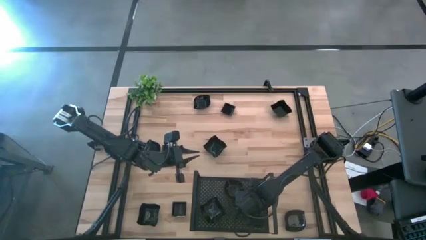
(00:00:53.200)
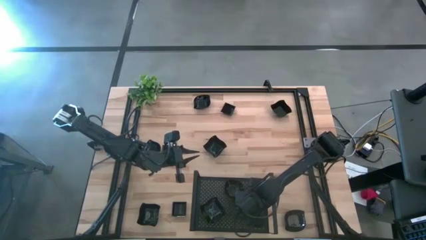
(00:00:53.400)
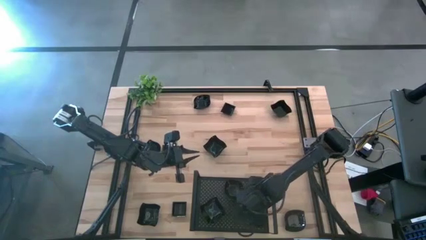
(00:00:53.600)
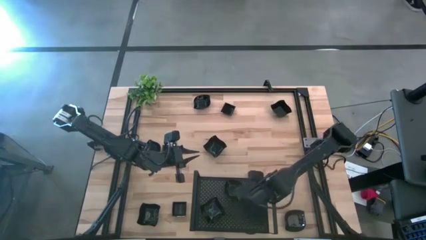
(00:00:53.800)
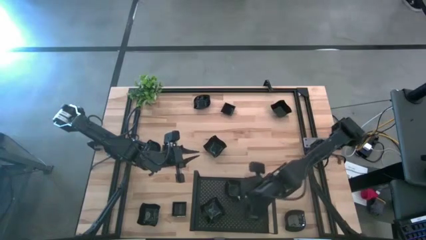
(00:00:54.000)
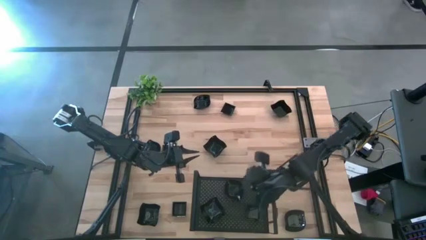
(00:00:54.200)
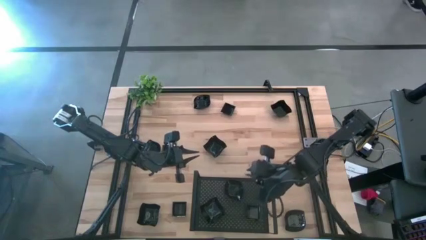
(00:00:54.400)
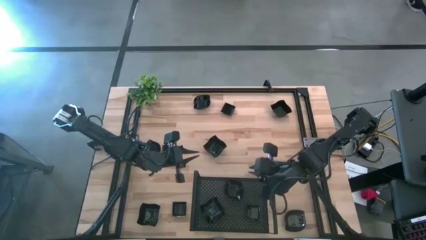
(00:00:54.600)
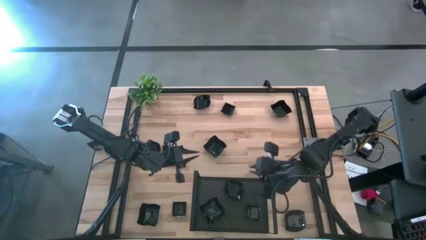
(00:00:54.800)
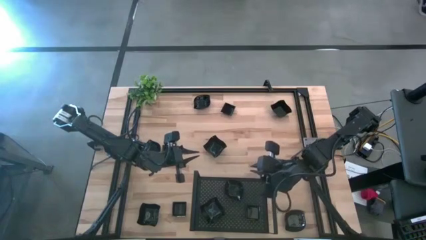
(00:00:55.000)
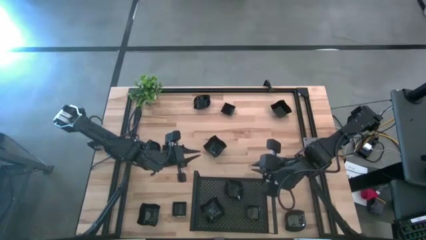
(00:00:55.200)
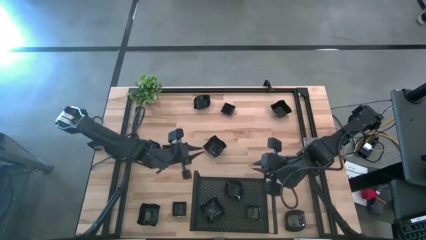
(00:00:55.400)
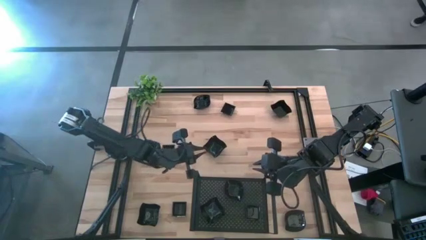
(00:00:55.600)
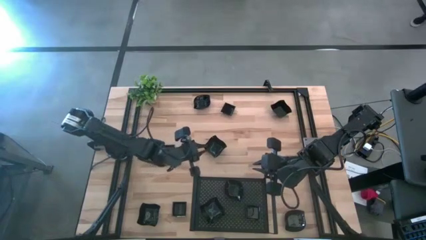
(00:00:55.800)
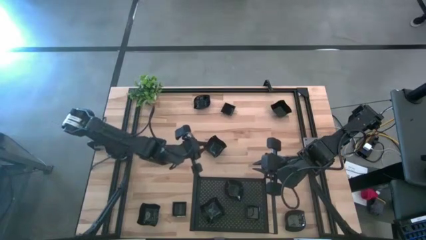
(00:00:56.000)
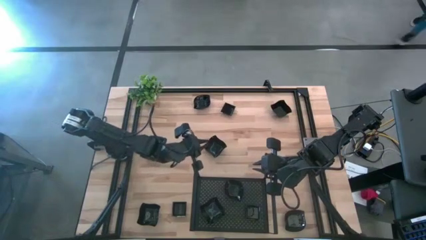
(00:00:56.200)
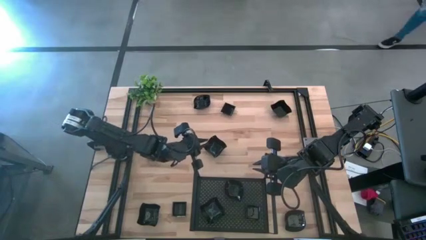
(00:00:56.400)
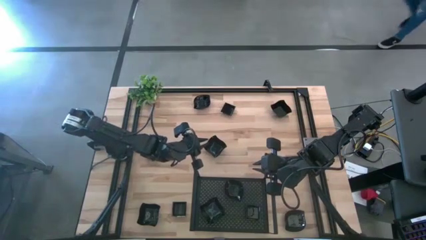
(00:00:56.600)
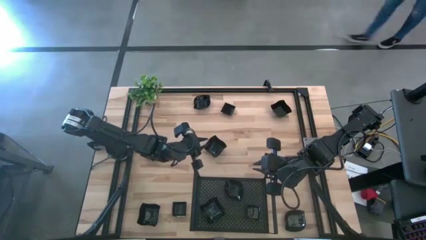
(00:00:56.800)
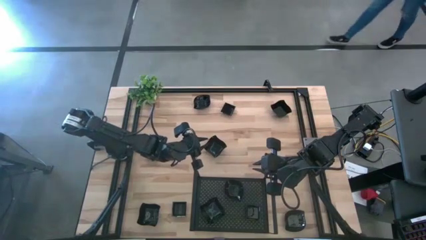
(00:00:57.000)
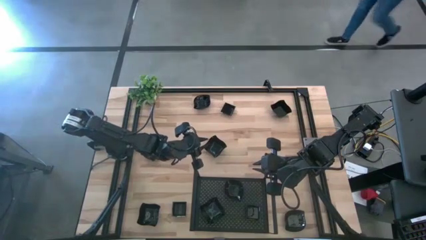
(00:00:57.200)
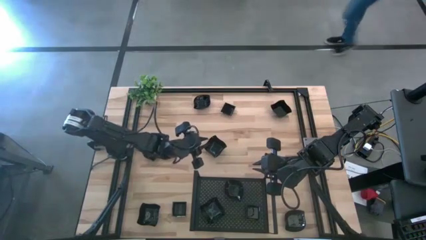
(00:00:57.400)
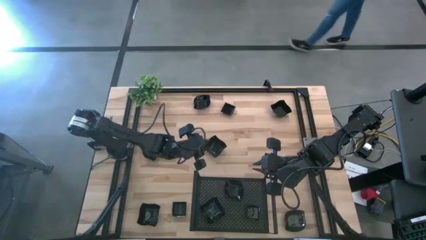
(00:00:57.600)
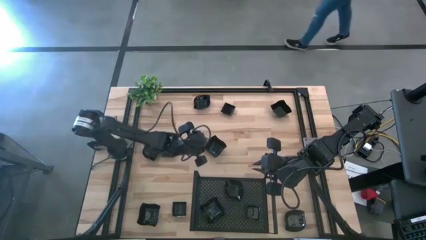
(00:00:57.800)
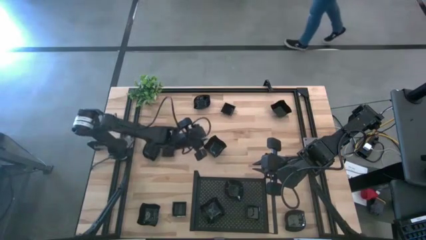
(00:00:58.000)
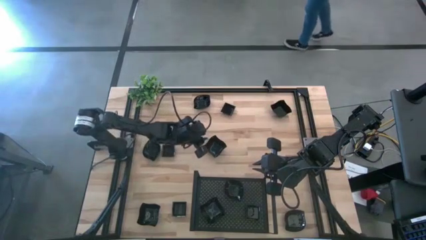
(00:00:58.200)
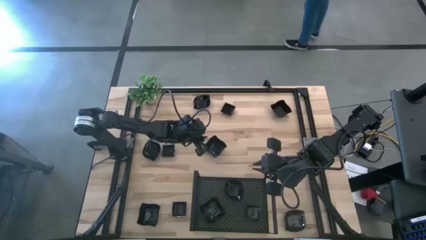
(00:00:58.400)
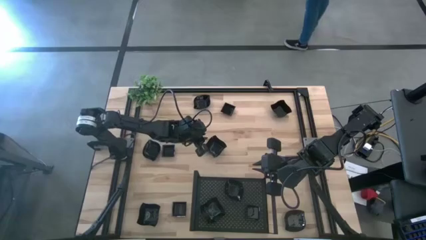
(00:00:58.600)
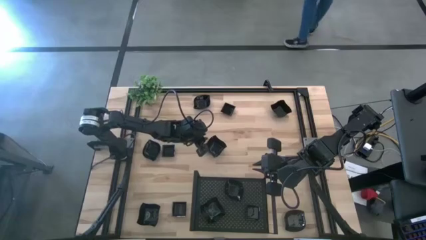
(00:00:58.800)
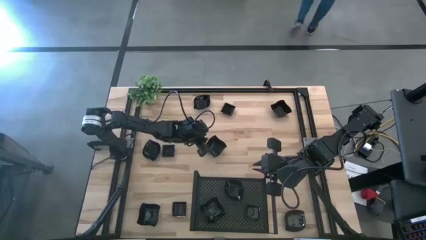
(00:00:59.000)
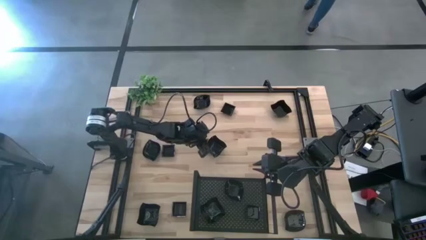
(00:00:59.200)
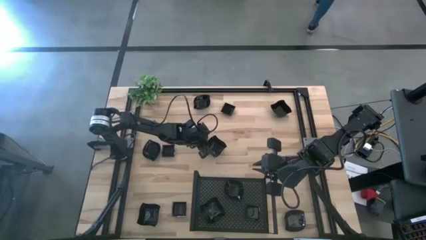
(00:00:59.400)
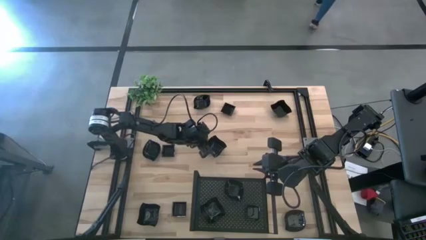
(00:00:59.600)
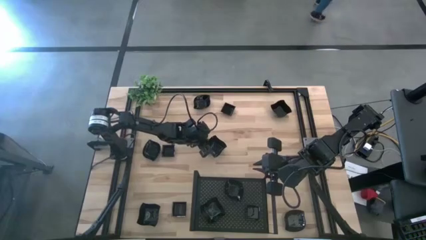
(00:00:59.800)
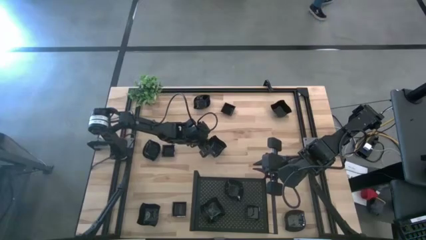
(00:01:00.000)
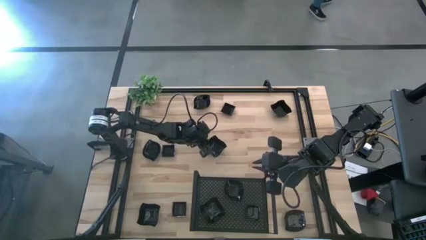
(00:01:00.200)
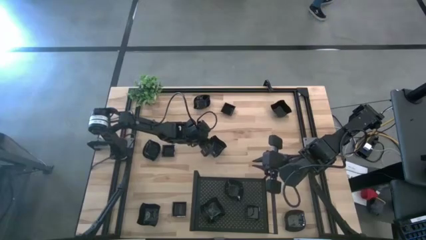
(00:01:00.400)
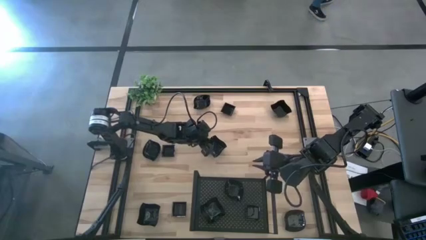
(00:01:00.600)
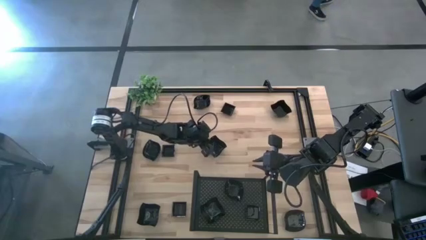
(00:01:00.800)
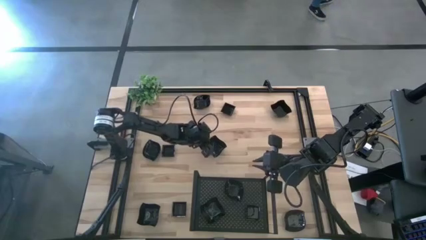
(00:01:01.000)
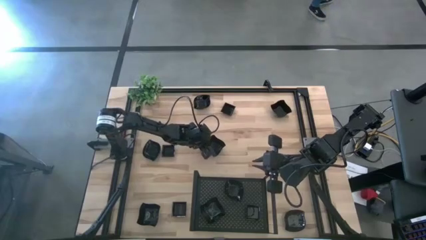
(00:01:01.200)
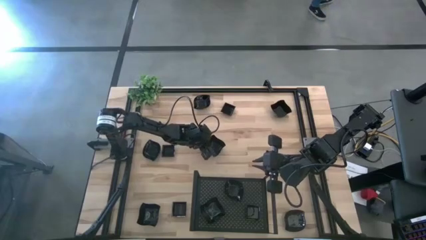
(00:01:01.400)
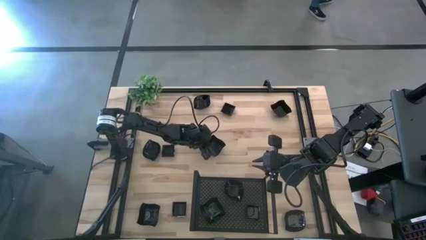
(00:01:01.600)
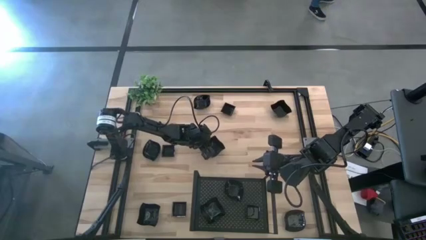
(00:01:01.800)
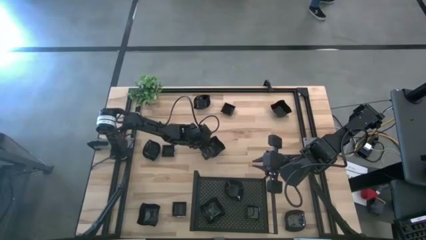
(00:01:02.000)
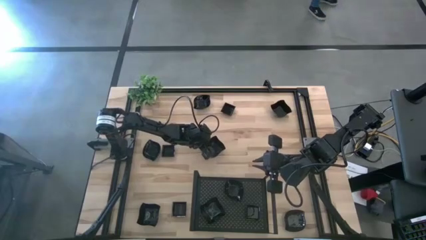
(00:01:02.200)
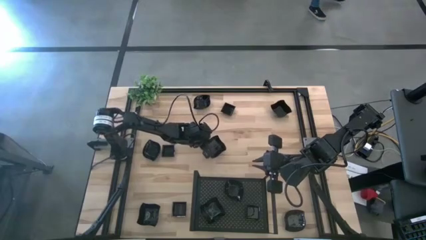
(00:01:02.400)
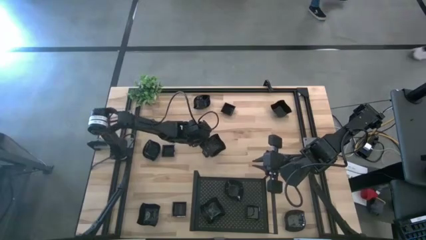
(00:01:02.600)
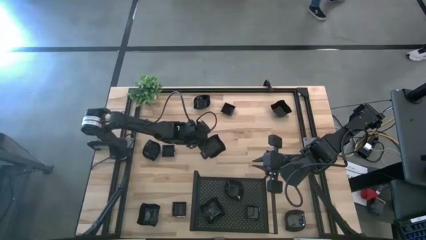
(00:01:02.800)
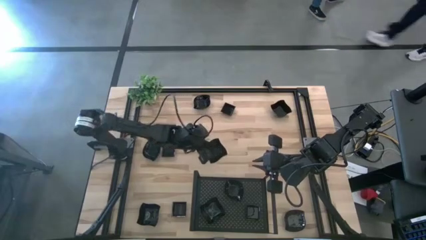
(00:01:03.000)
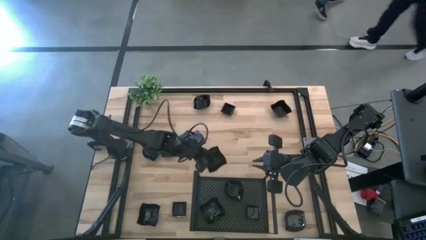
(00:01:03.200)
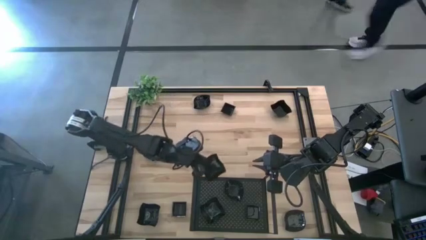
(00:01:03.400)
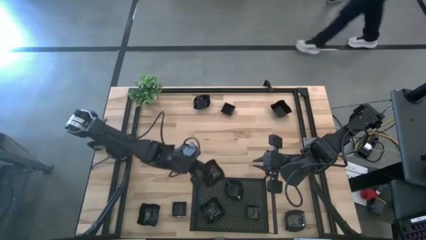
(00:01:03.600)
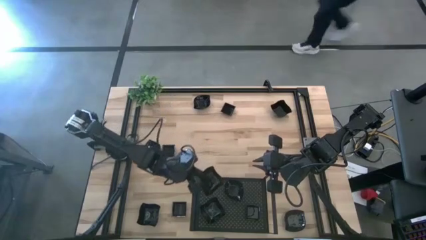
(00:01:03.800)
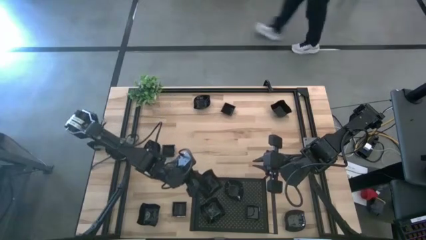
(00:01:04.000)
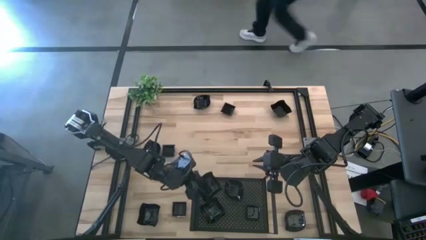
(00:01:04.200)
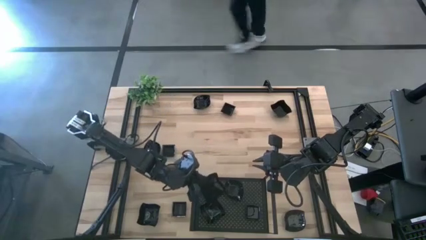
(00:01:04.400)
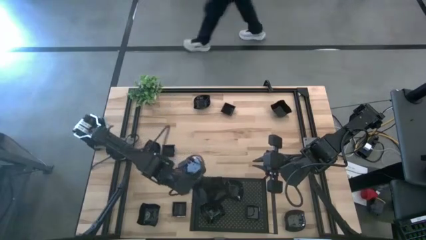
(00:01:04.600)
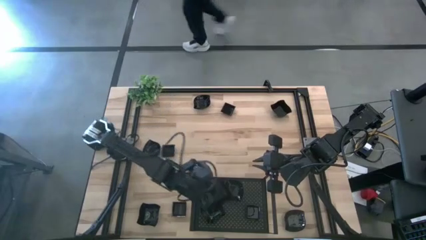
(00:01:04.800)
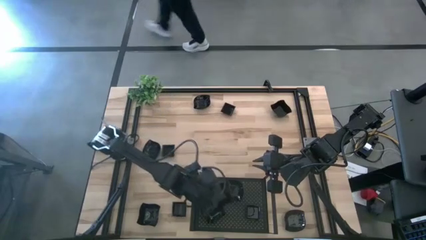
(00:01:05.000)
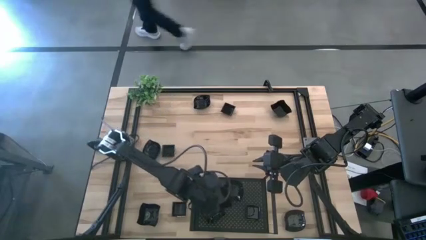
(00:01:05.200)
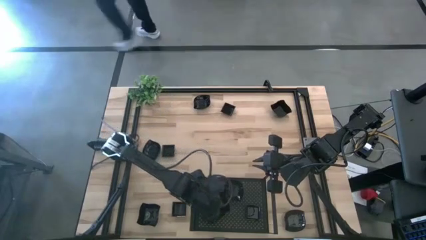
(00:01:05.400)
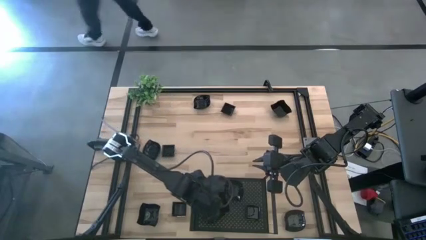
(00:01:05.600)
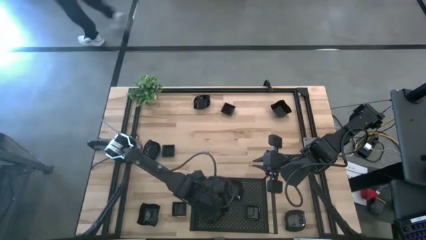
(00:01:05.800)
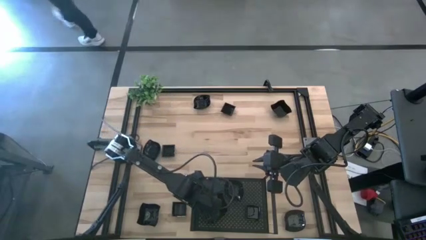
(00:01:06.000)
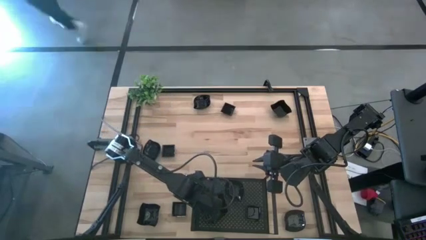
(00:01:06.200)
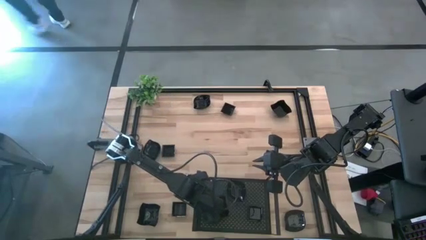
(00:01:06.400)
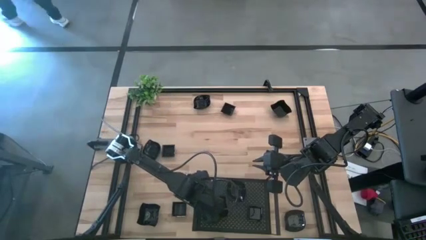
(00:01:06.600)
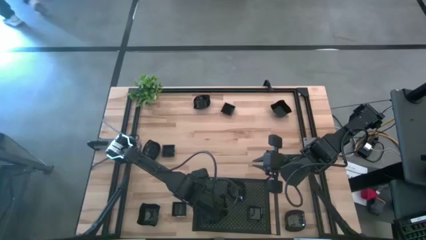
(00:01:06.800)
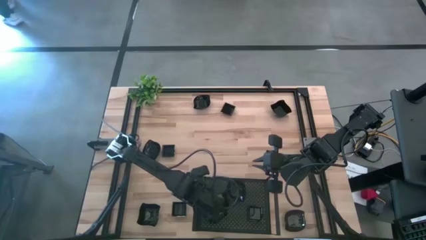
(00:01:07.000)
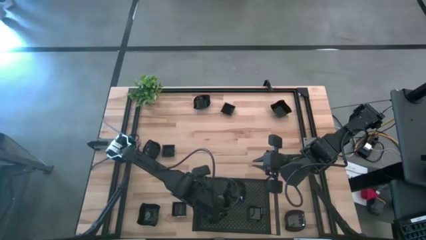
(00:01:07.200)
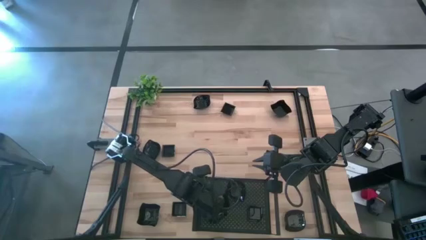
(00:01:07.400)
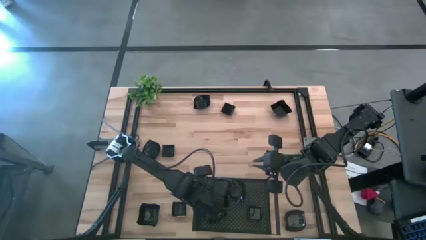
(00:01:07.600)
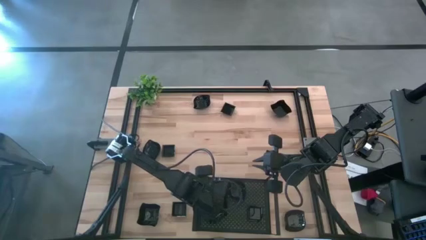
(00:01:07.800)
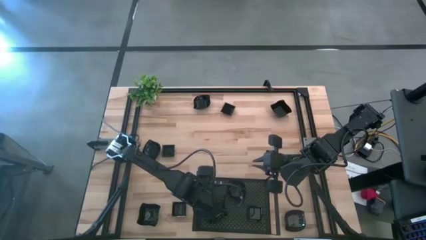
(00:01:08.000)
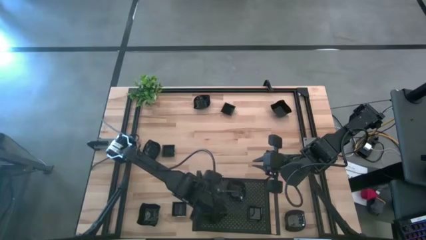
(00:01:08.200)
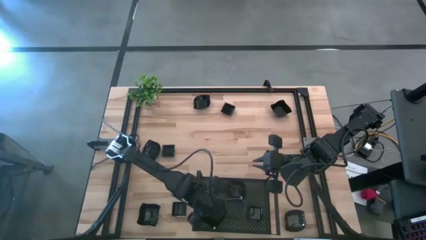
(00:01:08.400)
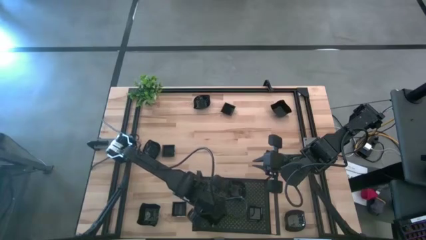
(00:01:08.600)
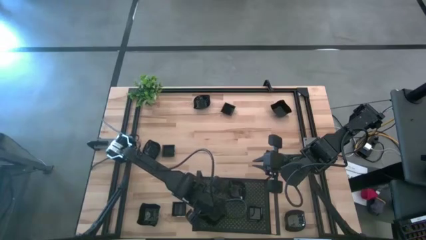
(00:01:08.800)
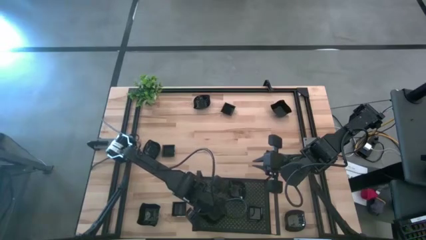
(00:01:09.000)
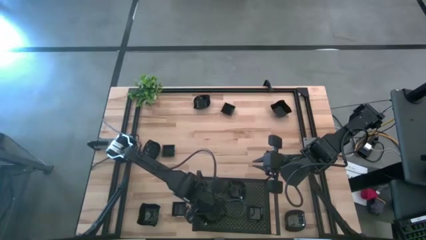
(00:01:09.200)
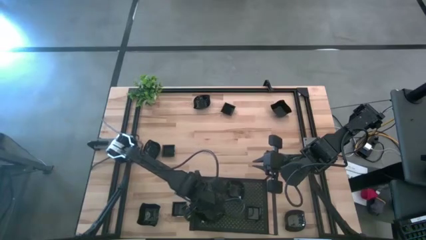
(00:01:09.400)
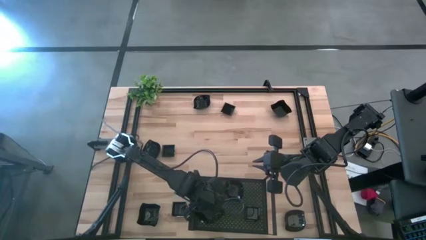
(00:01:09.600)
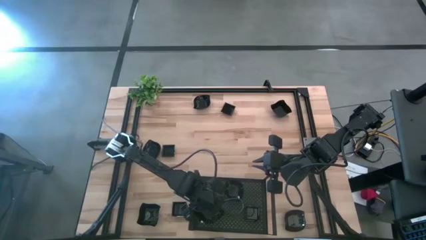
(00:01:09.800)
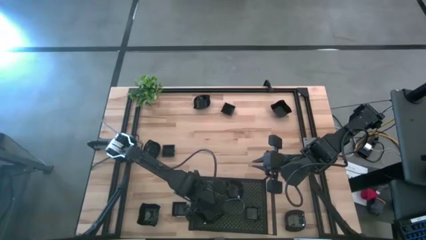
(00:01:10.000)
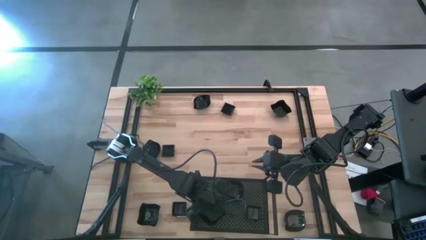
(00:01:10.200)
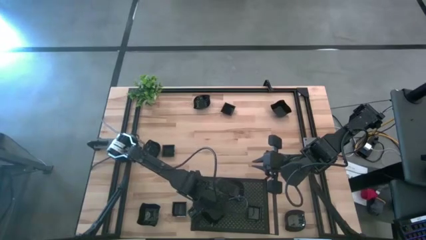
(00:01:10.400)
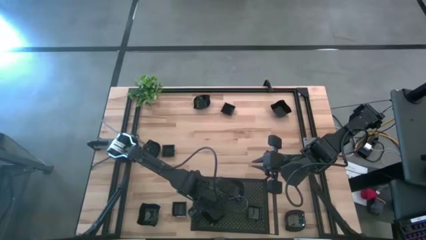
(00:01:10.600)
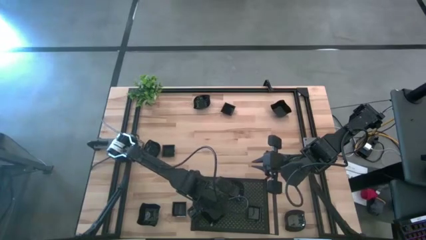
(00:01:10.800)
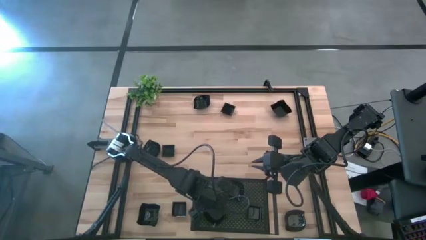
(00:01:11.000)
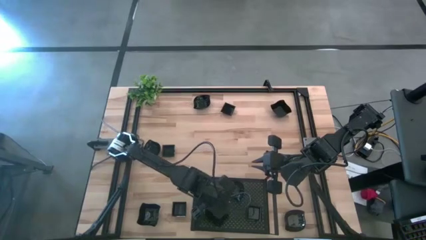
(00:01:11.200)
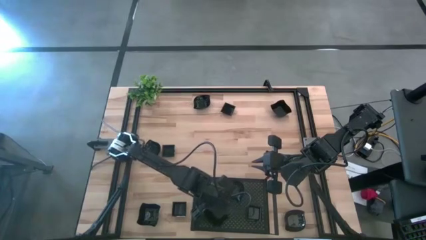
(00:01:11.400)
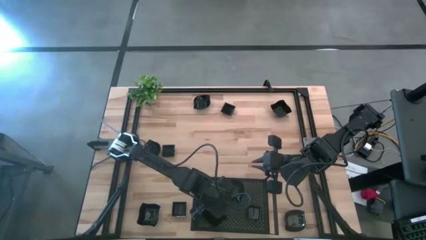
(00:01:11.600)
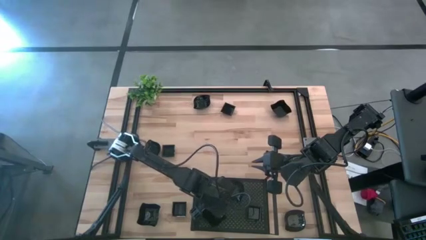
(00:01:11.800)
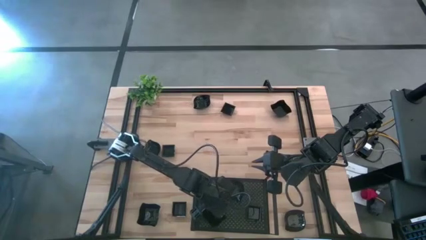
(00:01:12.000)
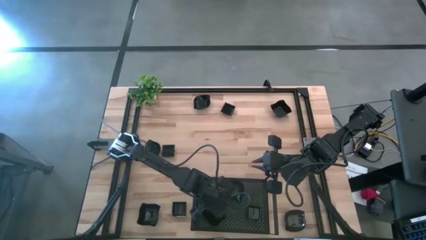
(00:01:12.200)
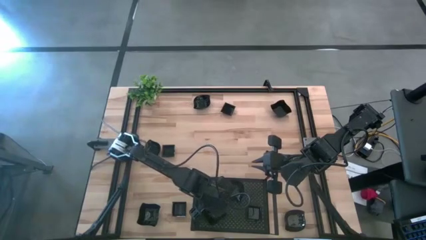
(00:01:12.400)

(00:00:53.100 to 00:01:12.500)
Task: Pick & Place Mini shaped plates
Stack the distorted square plate on top of the other distorted square plate on the shelf
